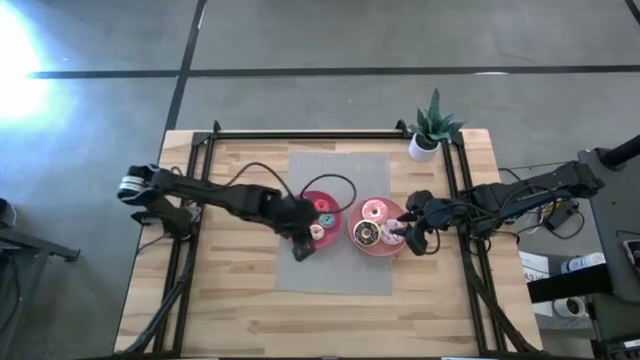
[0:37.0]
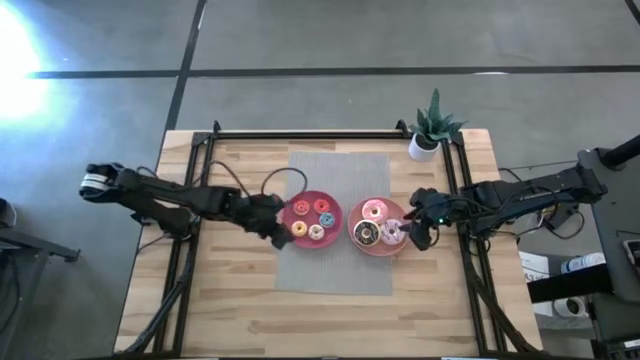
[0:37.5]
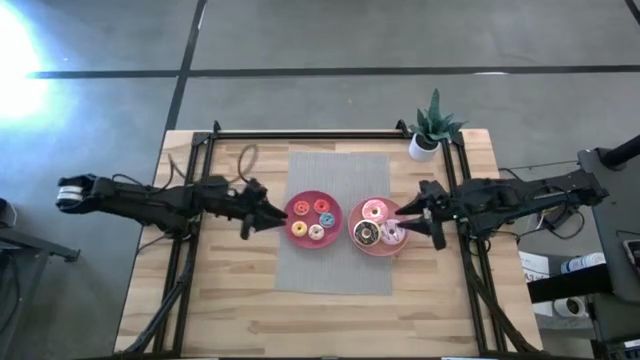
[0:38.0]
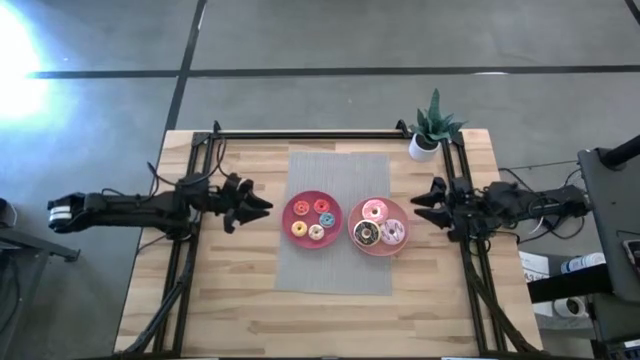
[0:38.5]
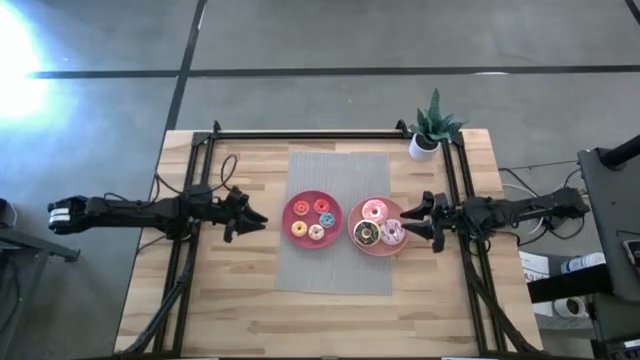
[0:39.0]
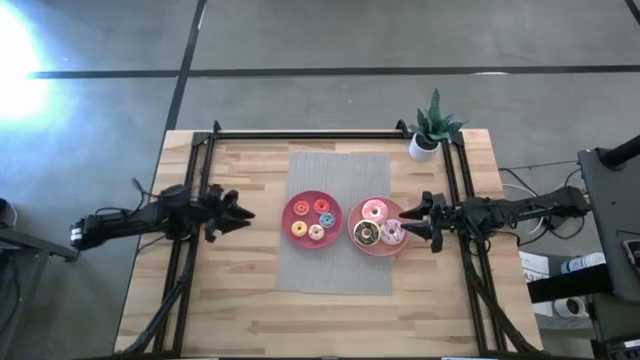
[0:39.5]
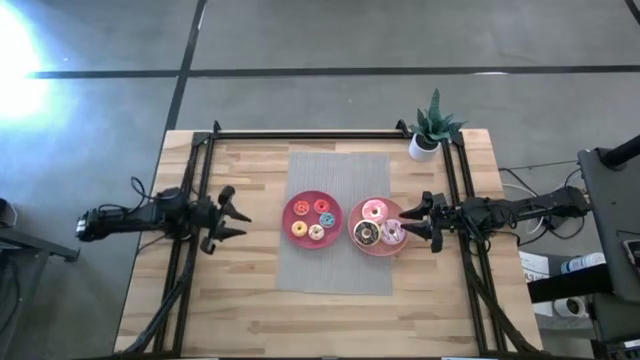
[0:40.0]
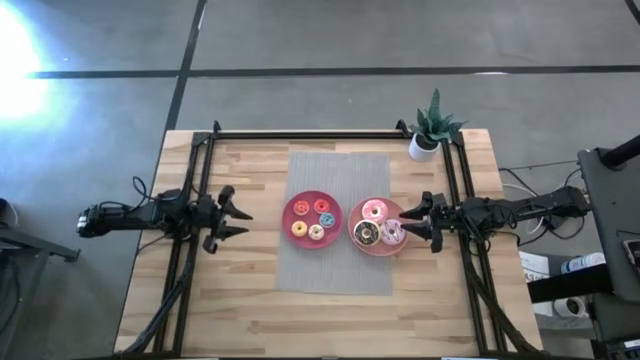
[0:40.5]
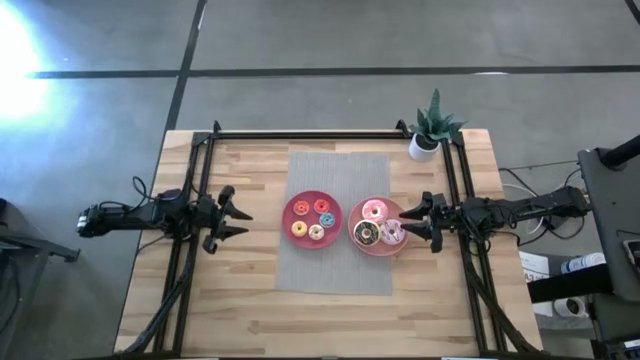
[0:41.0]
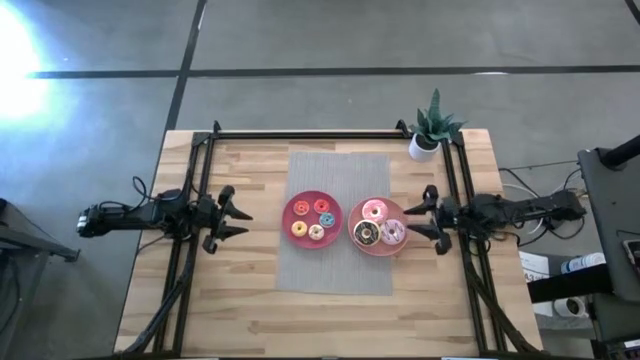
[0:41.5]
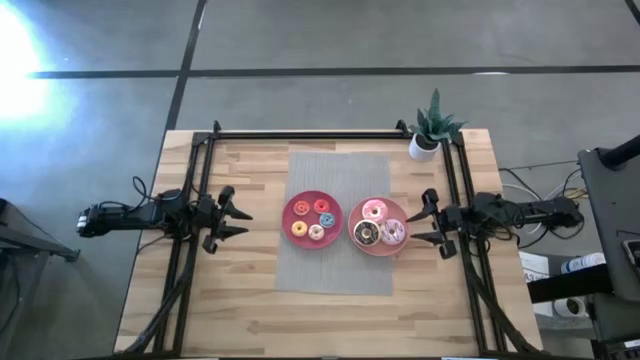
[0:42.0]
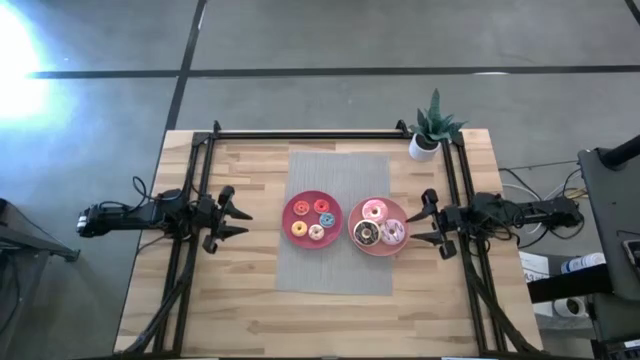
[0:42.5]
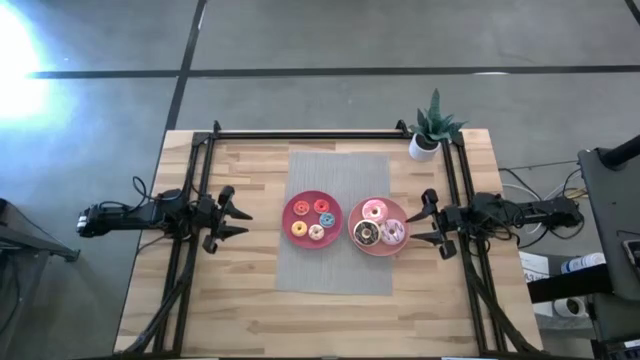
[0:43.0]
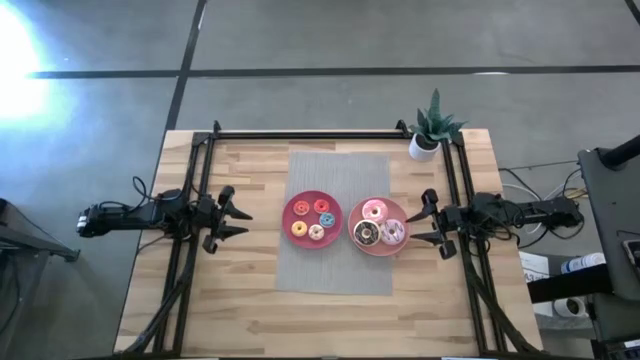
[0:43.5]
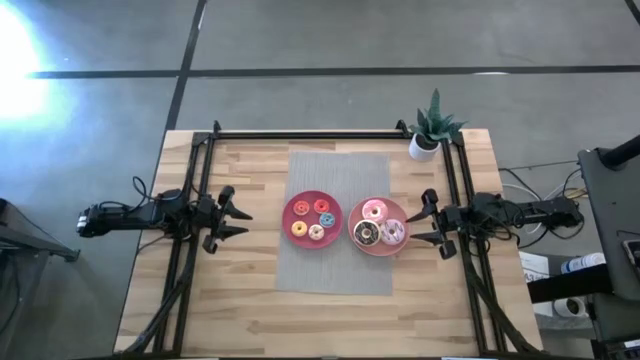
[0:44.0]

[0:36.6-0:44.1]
Task: Pick & Place donuts
Return to Home Position

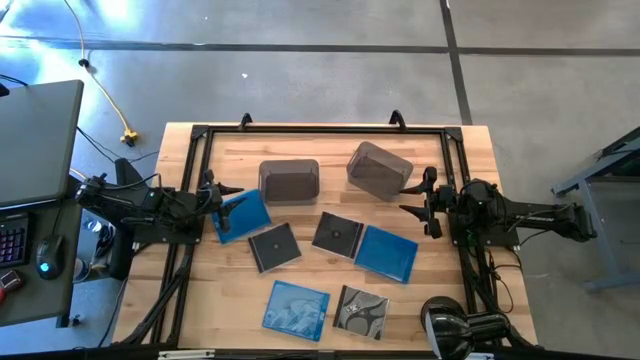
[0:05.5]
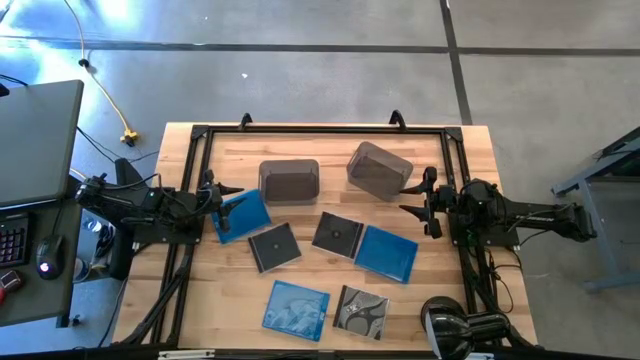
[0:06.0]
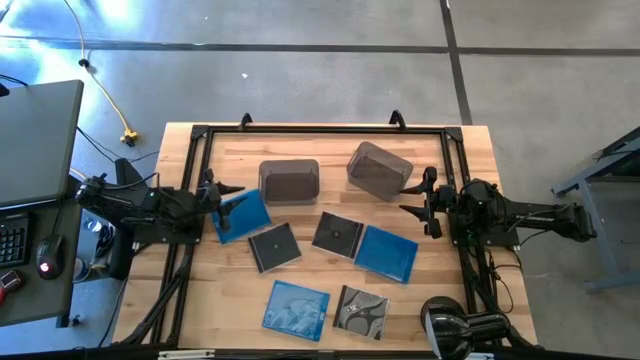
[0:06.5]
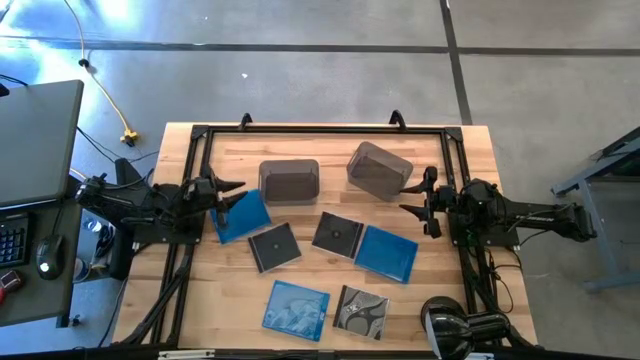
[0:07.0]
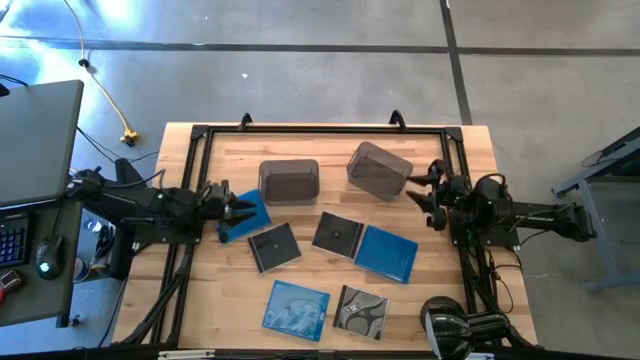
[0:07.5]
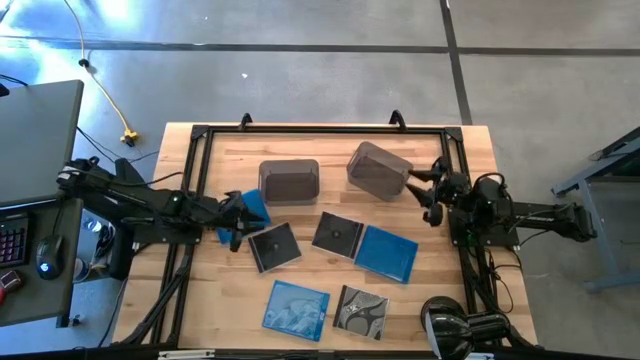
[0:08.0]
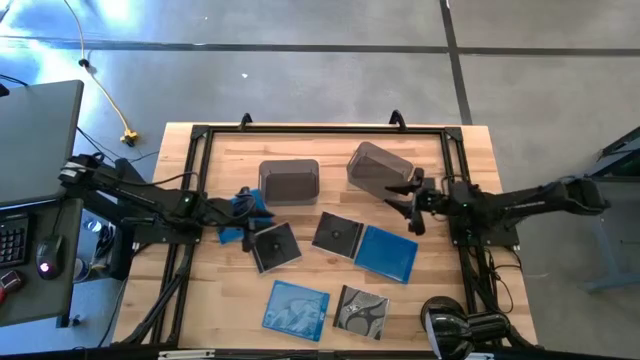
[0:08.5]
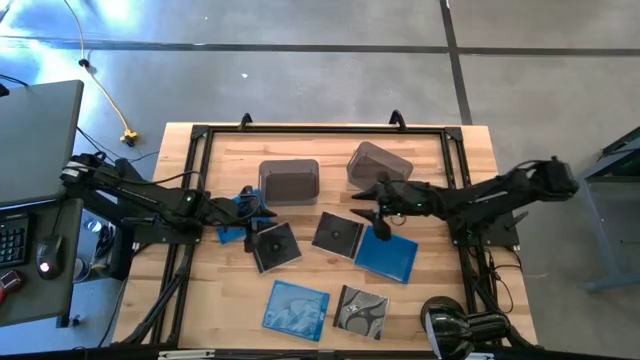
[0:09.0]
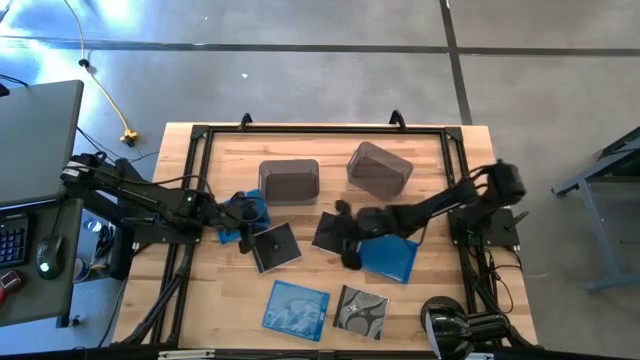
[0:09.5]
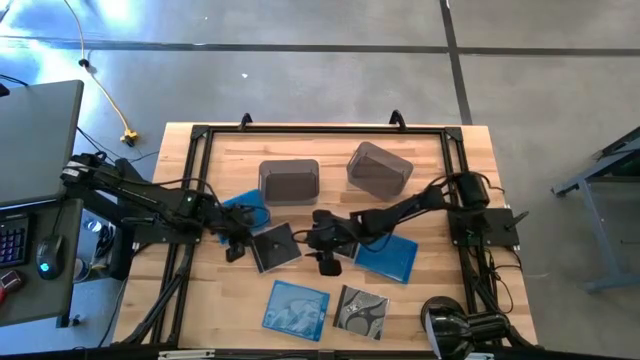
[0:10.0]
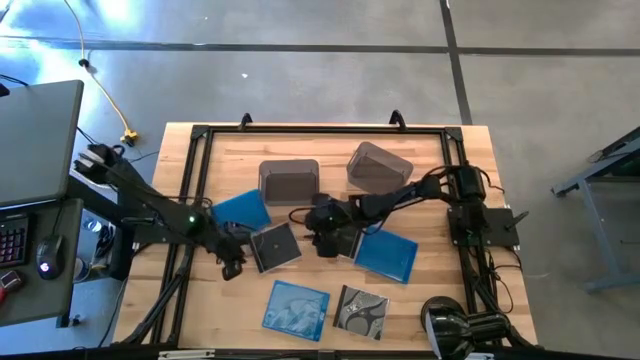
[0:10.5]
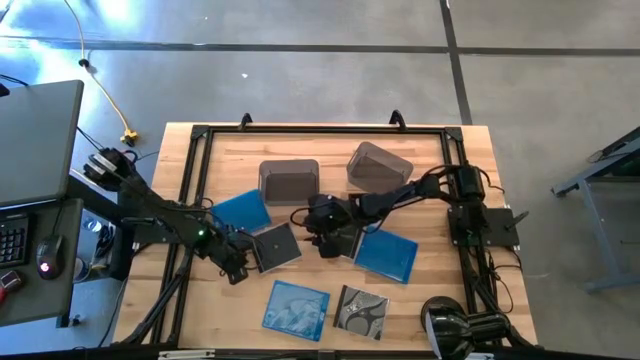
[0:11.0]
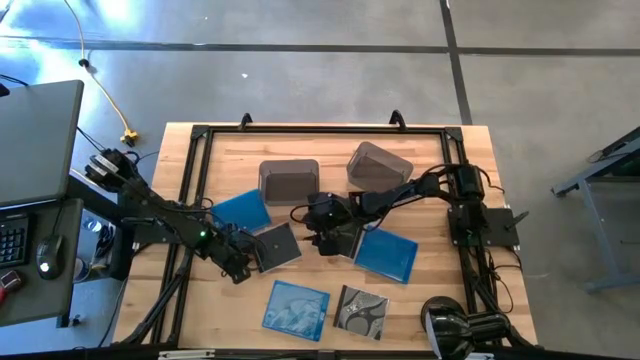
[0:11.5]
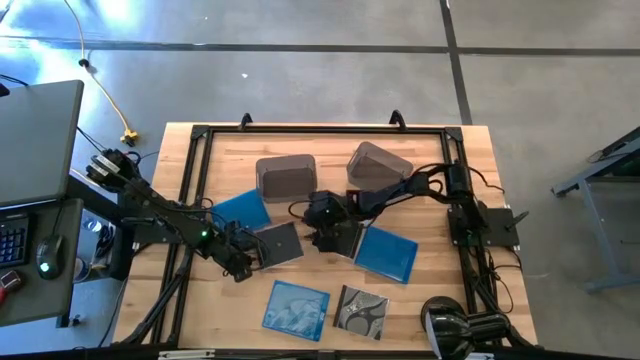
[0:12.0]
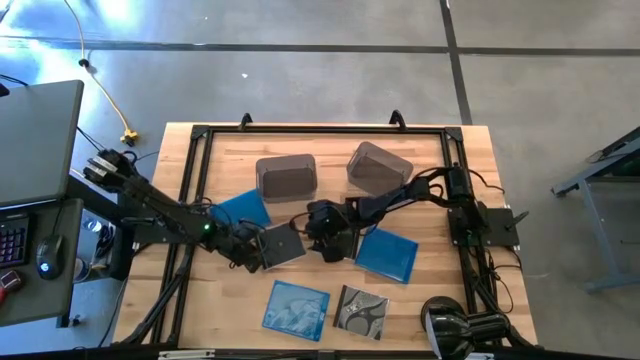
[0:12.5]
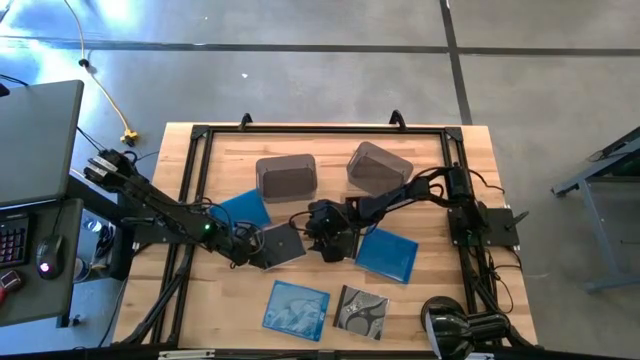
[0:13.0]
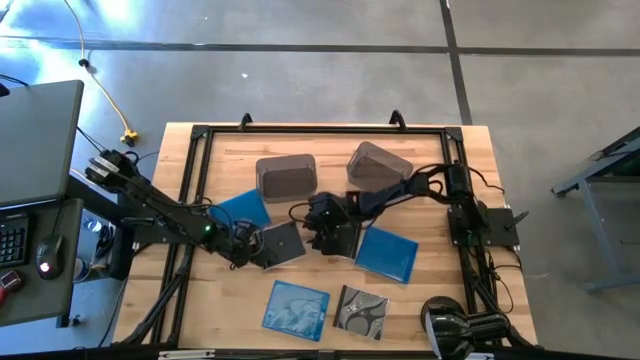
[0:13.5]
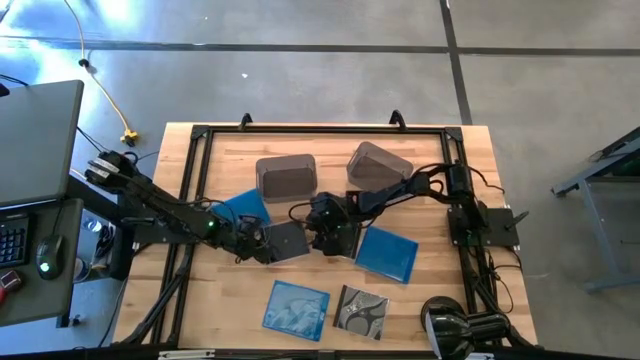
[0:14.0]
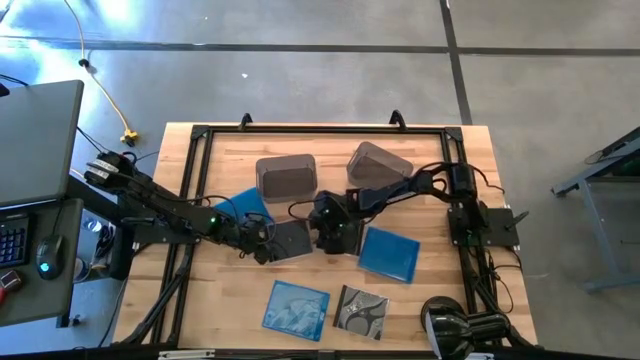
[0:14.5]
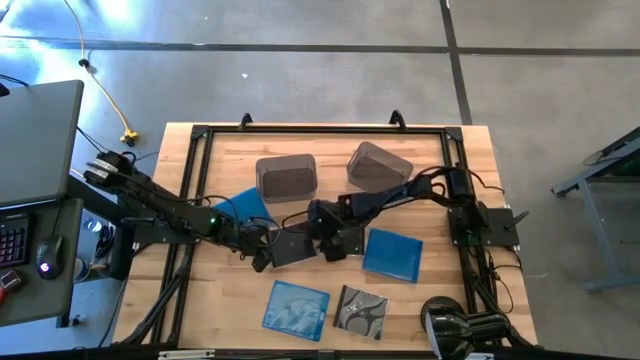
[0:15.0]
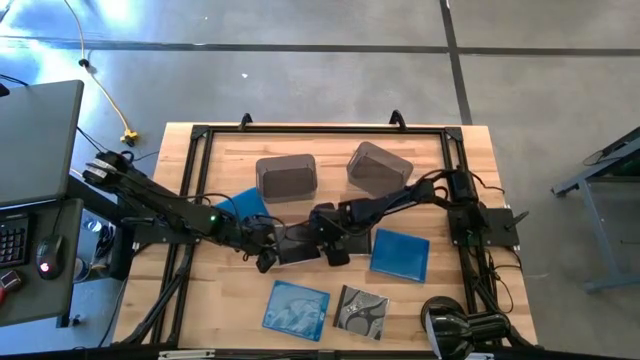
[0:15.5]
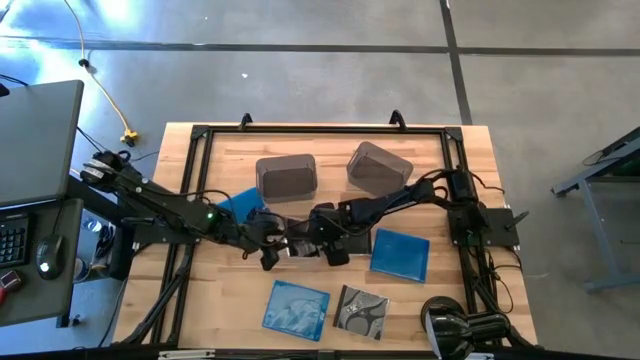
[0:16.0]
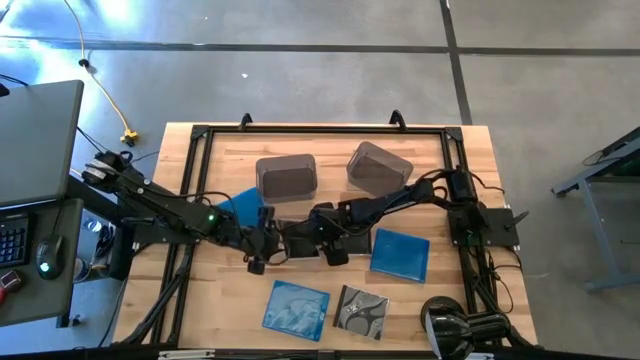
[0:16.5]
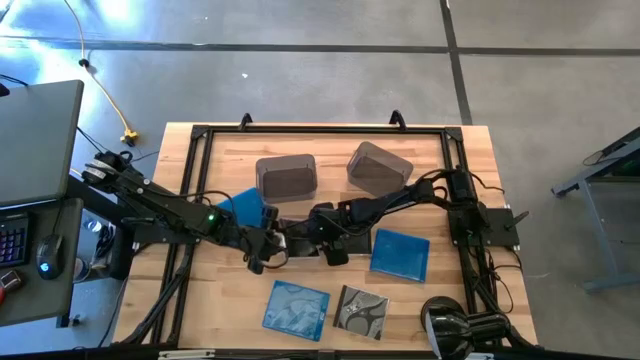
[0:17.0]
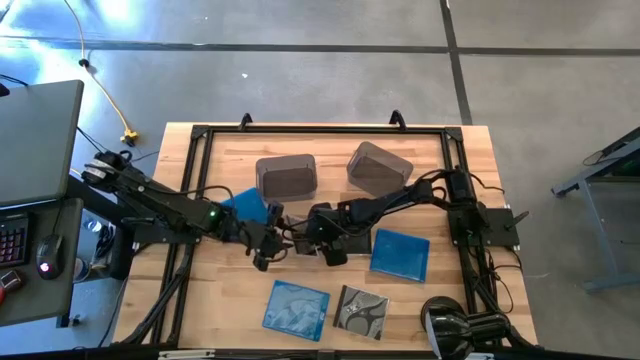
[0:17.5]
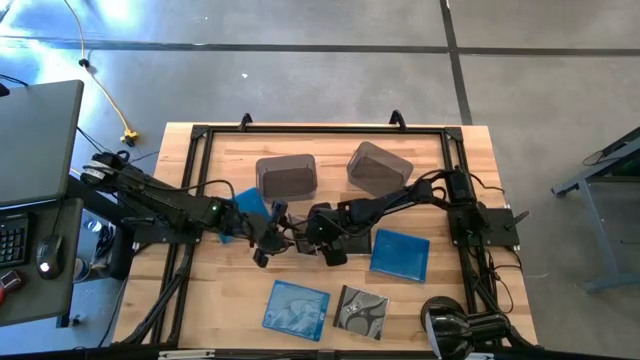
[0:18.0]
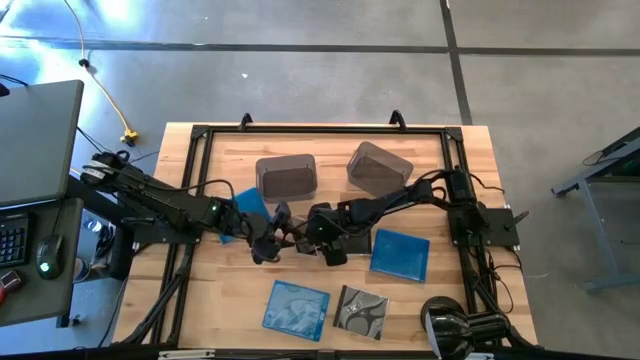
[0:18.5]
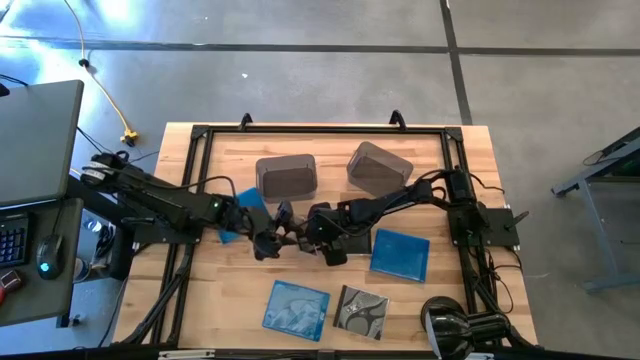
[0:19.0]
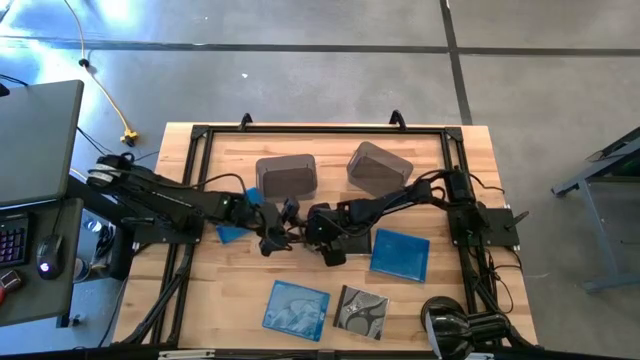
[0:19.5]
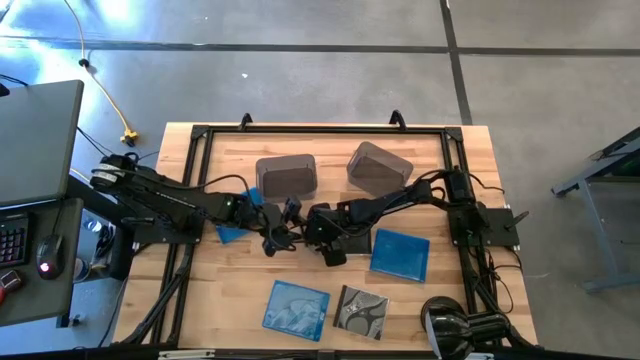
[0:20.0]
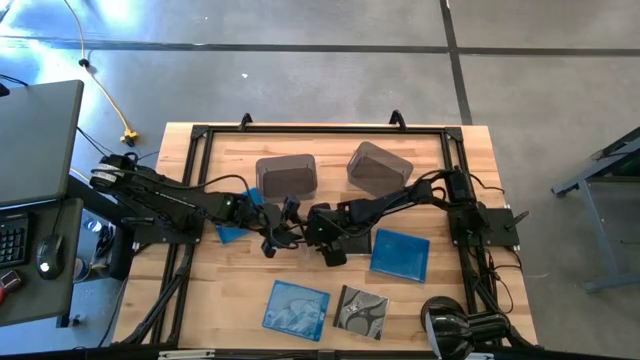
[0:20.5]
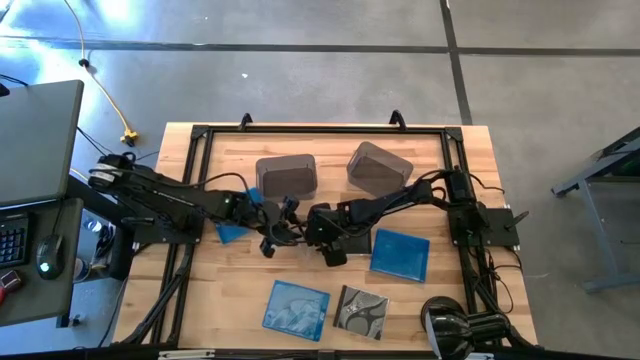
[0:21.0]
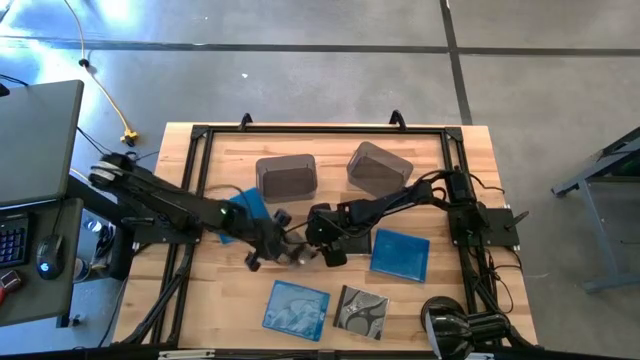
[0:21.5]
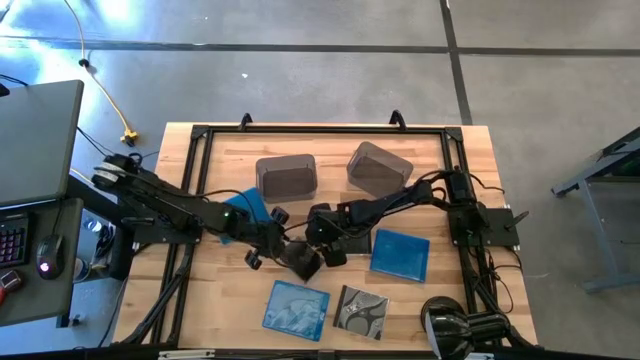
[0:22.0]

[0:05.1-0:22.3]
Task: Pick & place jewel cases by type
Put the top left black CD case into the left black bin
